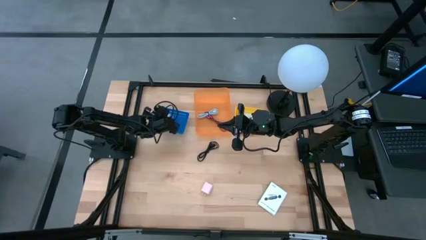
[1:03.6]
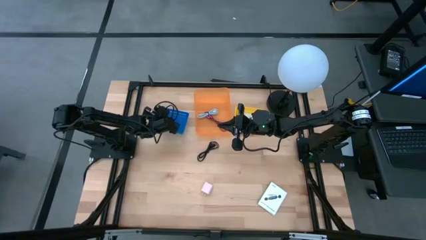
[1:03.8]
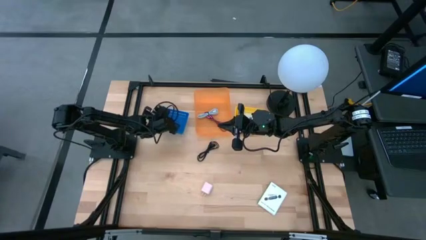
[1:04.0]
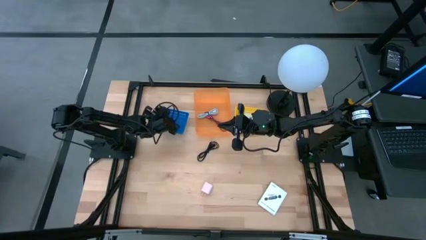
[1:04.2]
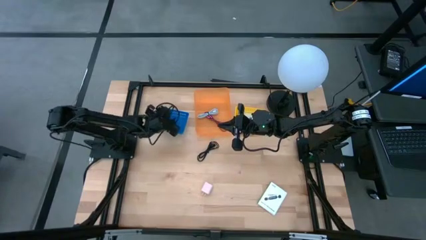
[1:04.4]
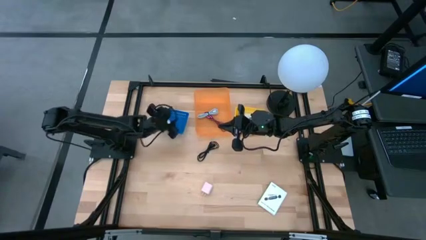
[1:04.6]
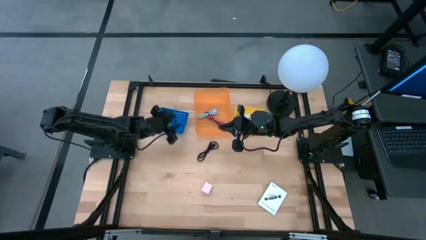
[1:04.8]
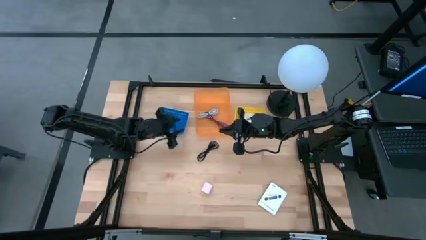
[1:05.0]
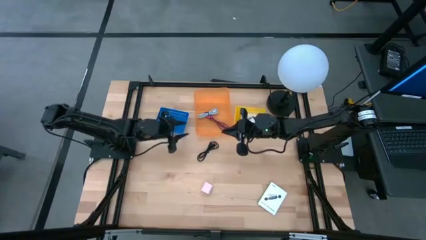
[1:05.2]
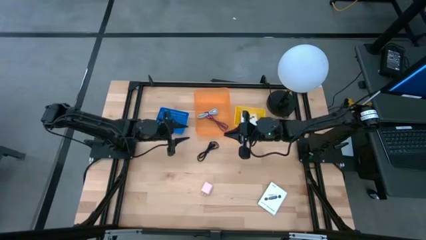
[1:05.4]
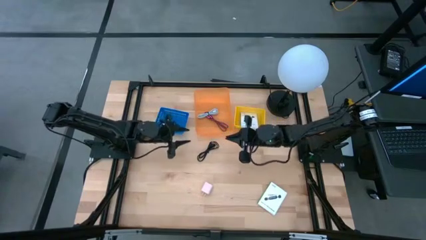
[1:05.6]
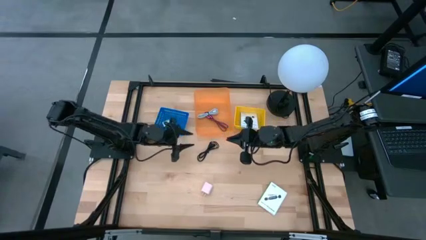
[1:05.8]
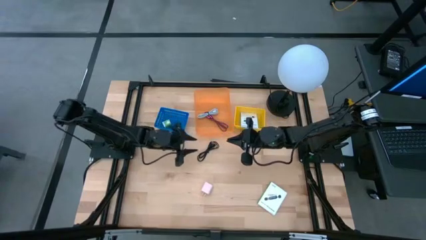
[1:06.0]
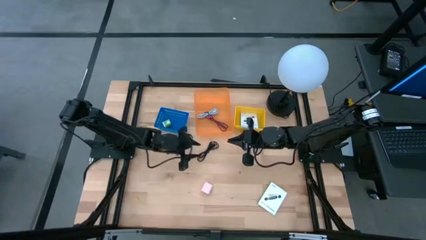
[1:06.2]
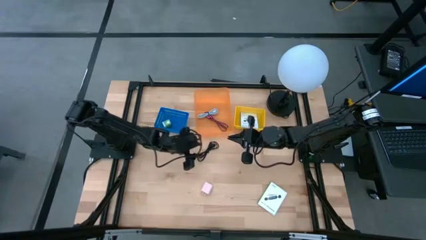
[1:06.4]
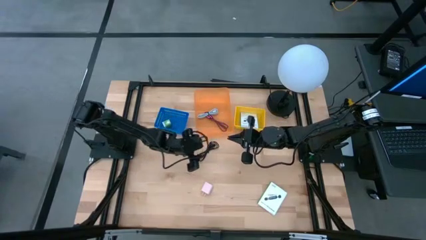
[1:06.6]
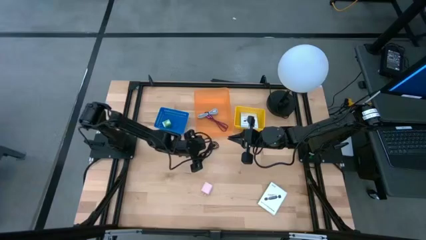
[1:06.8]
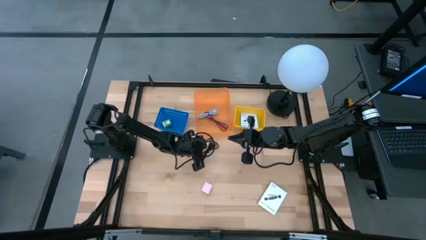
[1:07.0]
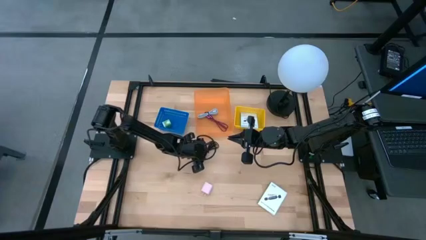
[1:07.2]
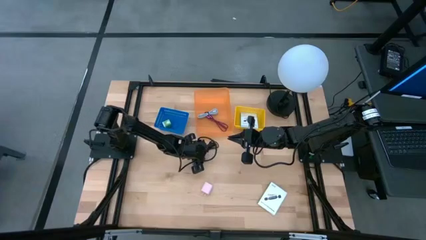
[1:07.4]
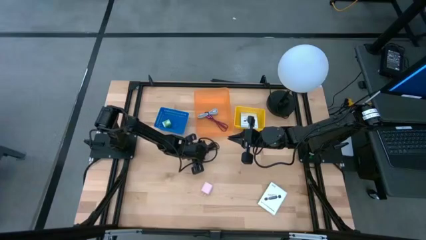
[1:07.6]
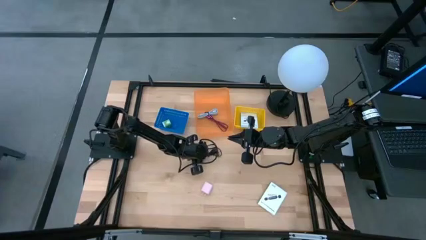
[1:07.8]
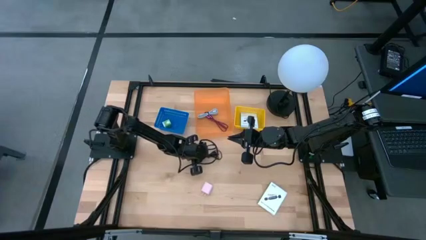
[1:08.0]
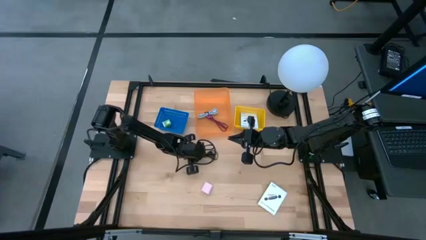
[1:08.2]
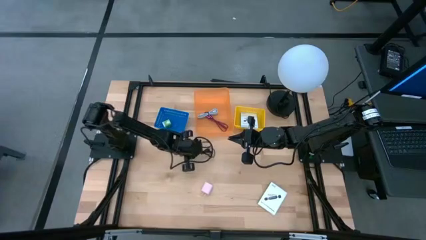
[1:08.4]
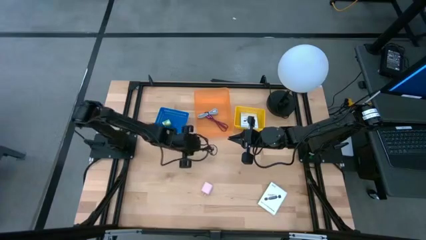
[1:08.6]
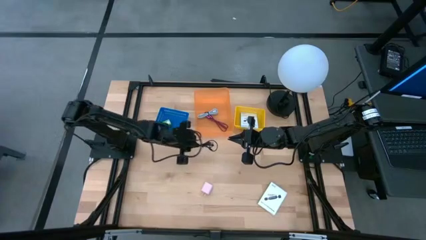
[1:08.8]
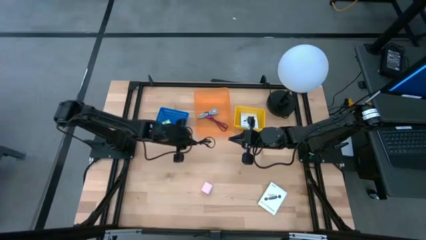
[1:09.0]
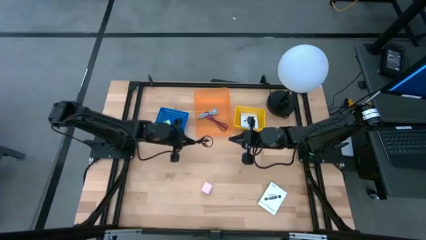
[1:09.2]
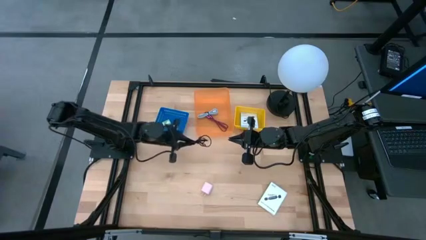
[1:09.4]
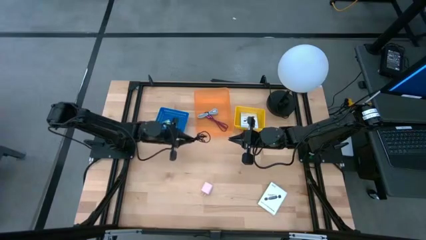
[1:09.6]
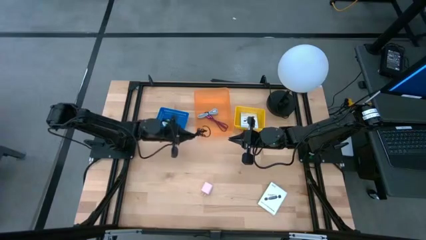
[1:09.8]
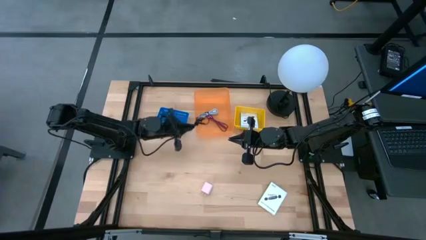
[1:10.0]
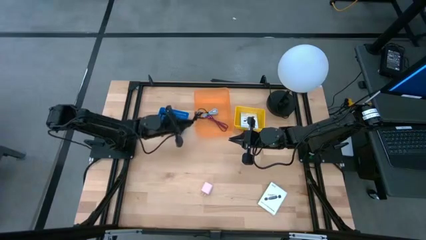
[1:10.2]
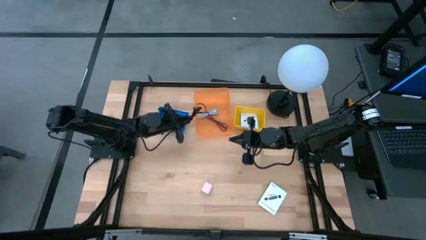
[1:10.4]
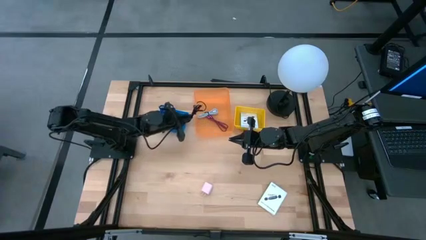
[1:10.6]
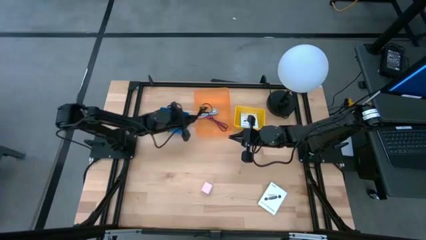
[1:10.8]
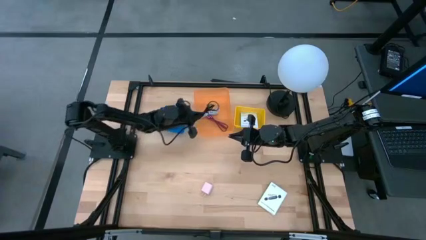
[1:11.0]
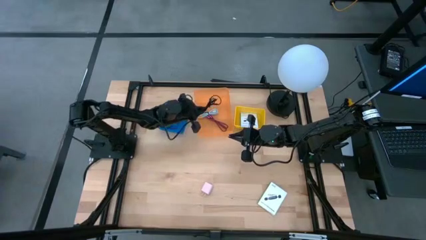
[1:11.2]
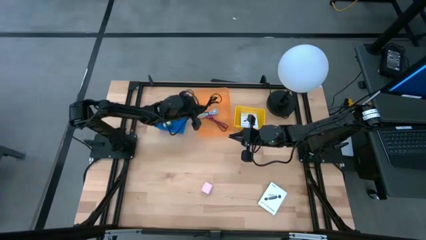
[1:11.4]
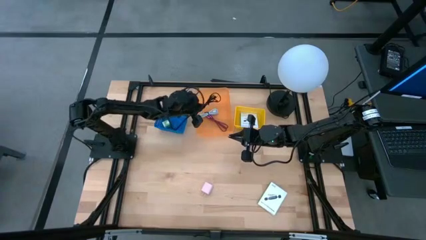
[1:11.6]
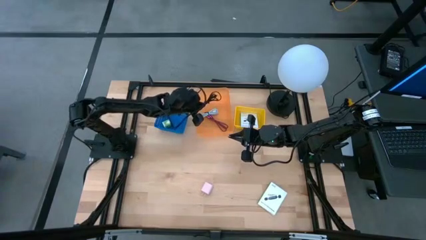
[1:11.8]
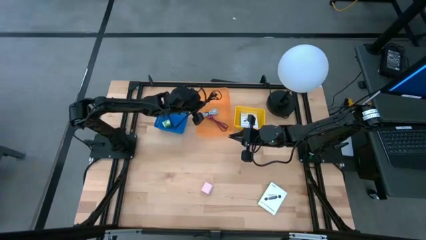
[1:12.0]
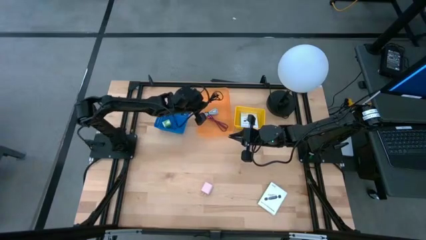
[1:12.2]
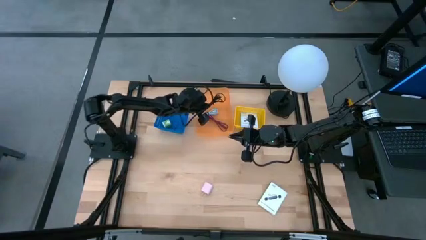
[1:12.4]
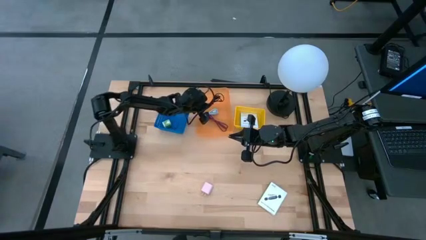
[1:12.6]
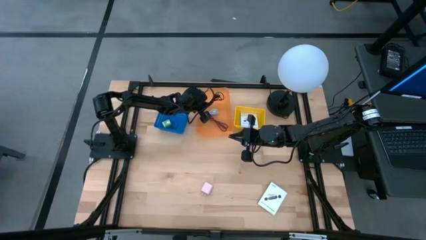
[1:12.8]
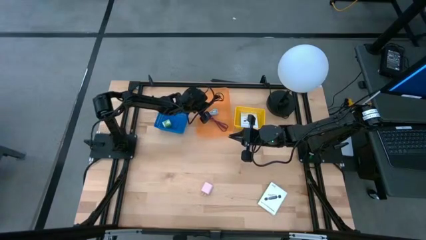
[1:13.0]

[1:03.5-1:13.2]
Task: Pick and place items into bin
Put the black charger cable into the orange bin

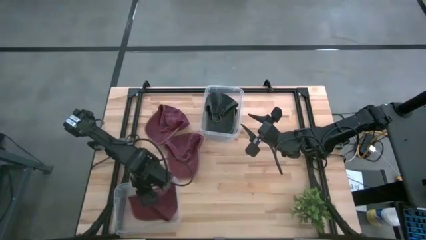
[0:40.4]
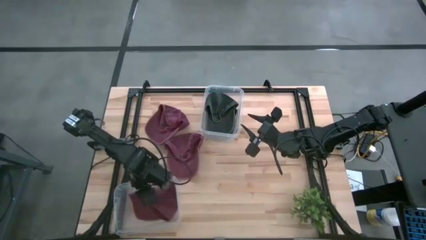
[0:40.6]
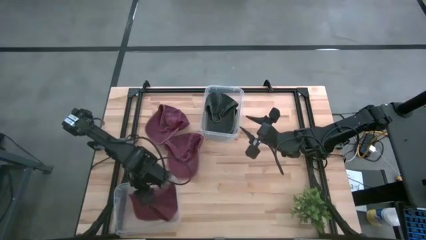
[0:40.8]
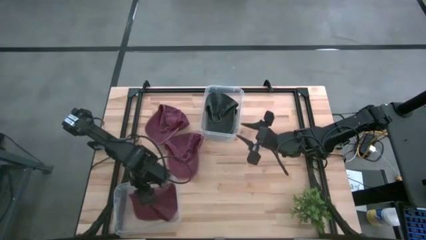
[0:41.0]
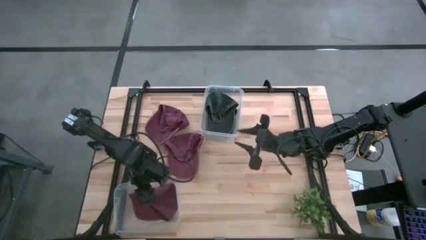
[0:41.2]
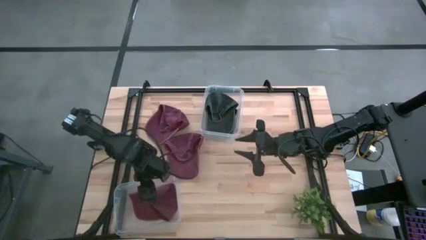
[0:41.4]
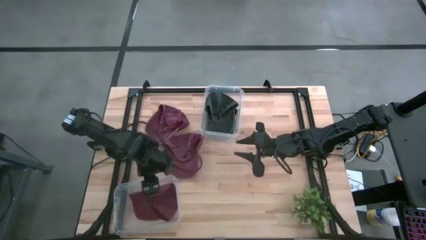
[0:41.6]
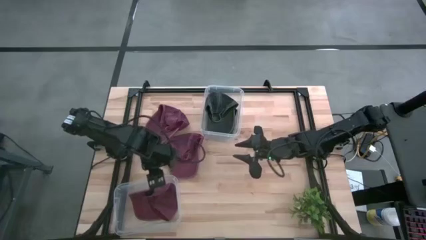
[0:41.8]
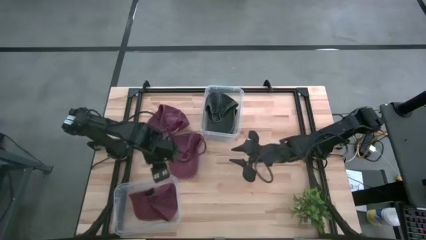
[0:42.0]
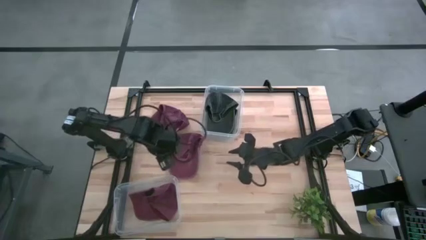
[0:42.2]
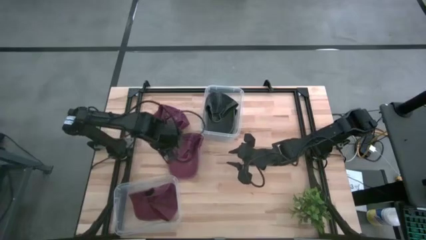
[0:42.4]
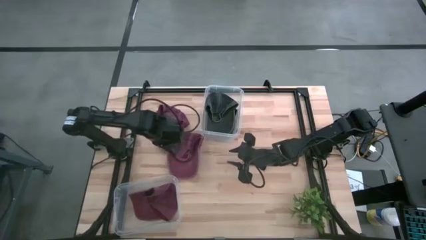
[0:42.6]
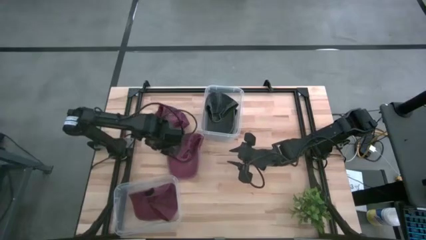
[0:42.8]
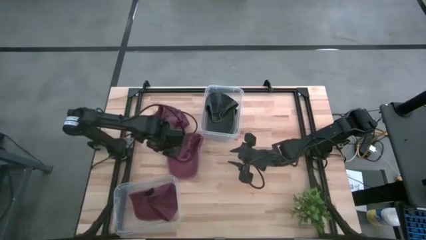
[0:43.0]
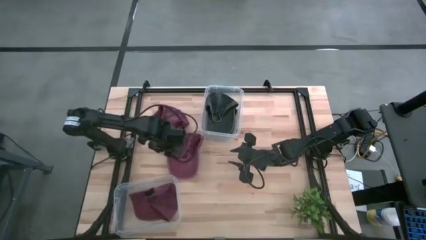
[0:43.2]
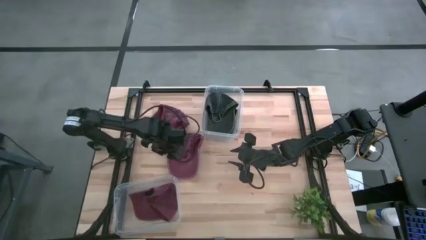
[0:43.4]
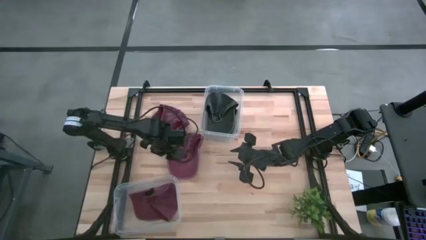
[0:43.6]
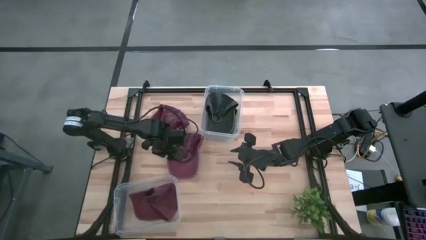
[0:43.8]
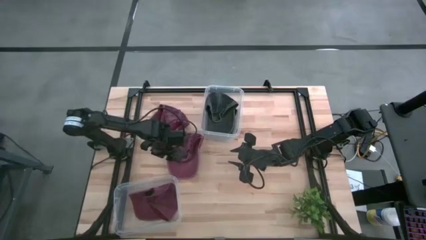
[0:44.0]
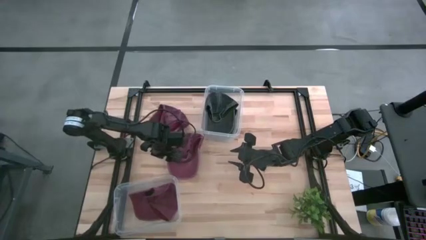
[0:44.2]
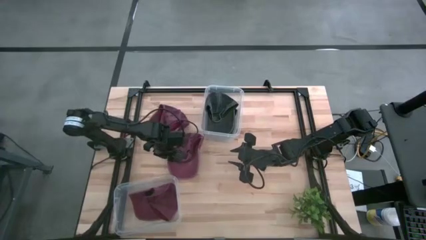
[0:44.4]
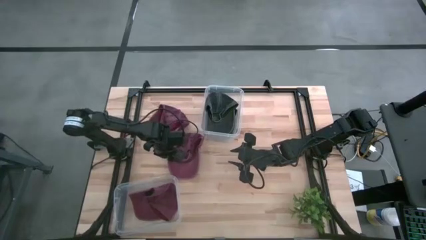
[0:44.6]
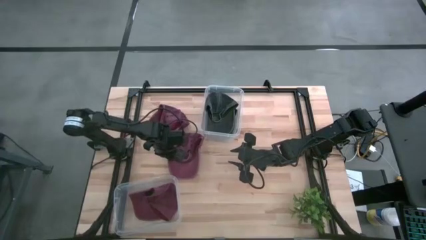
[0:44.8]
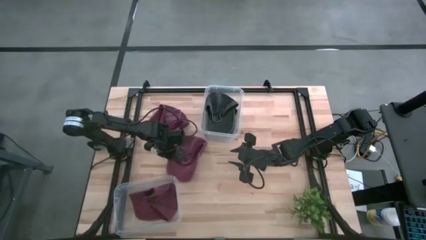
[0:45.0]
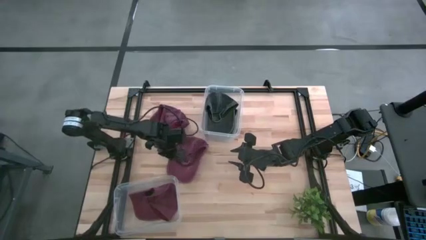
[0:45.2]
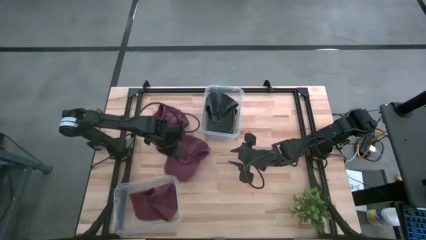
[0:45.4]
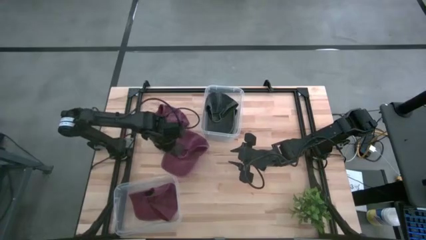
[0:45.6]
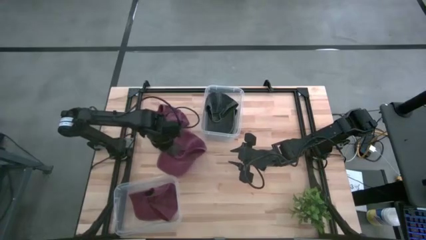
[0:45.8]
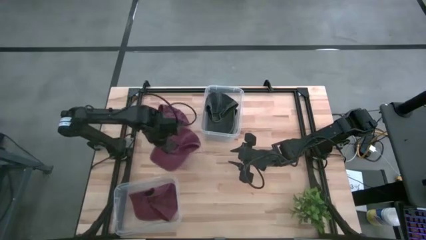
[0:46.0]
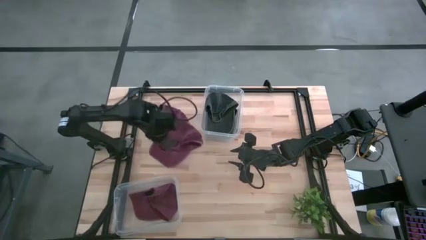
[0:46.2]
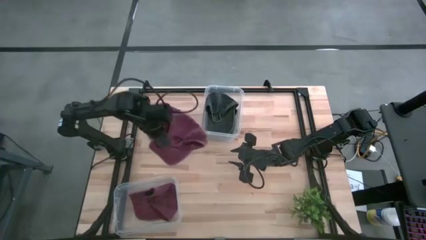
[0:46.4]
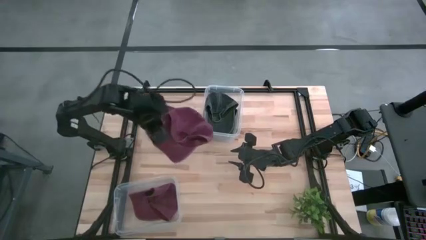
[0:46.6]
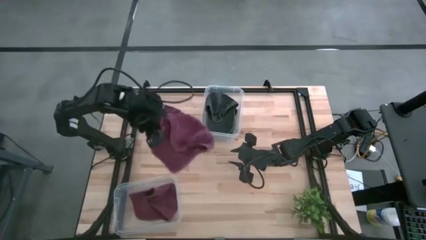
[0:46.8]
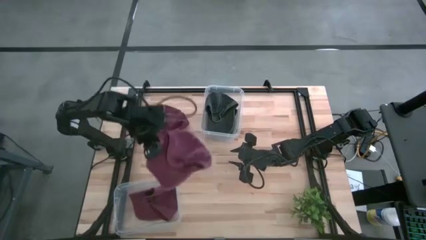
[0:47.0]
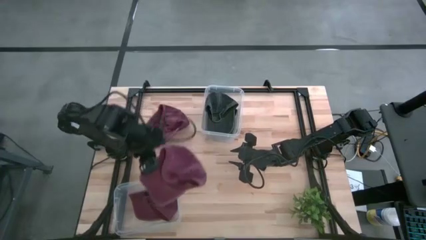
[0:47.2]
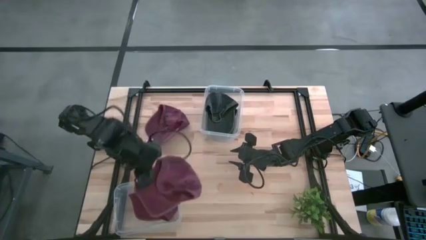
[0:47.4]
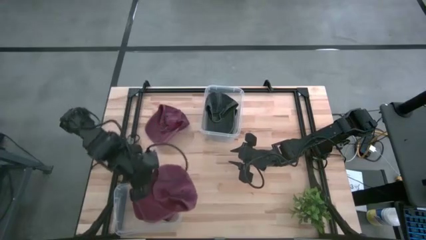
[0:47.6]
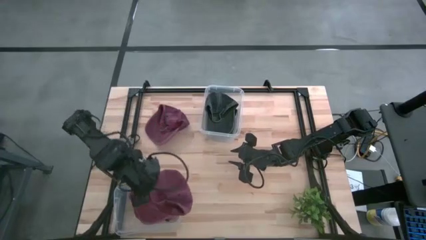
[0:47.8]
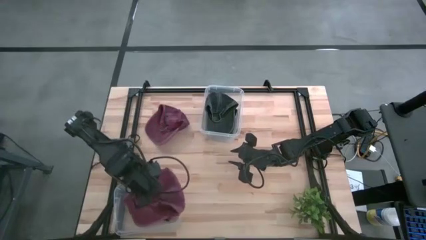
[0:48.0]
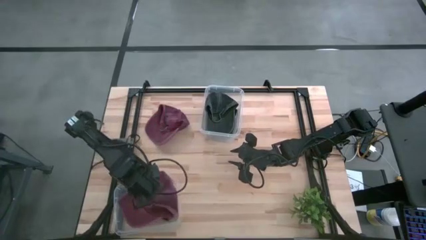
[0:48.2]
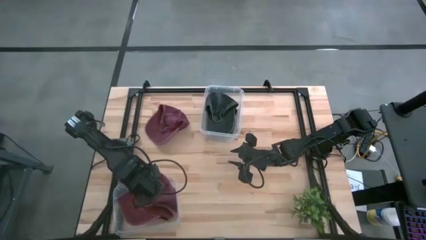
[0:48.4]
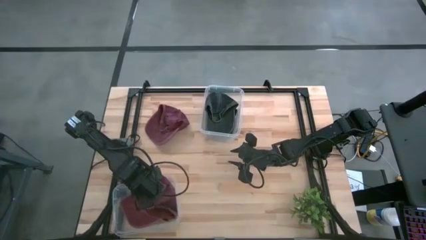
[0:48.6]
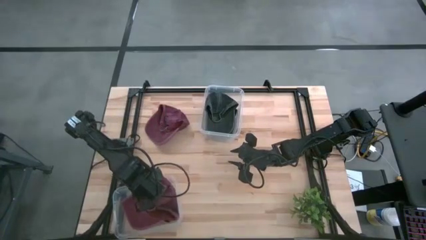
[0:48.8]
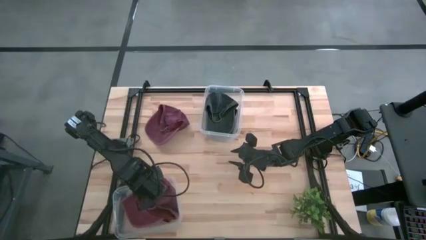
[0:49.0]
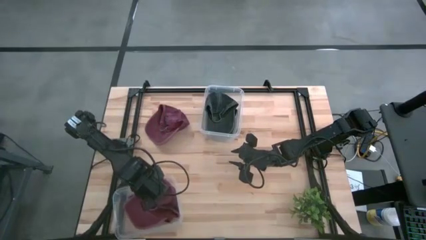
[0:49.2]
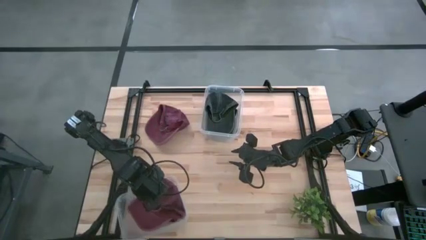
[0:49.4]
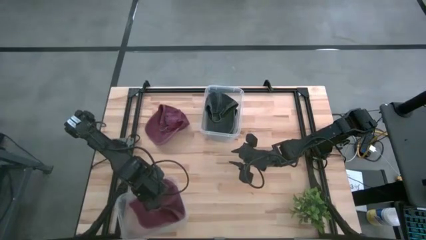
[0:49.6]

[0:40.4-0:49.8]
Task: Pick and place caps into container
Put the bottom red cap into the bottom transparent container
